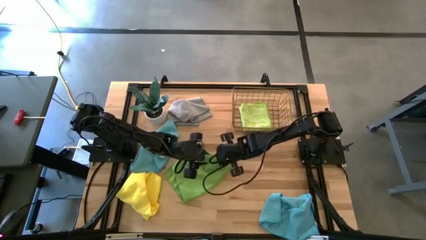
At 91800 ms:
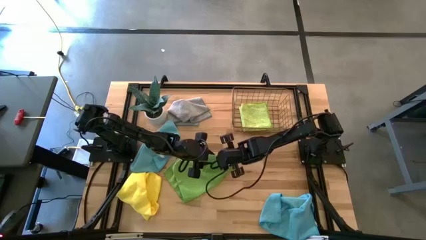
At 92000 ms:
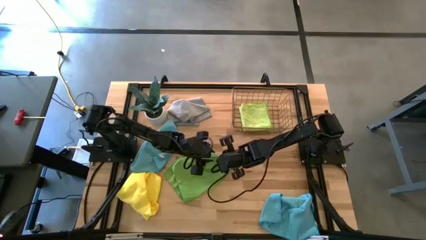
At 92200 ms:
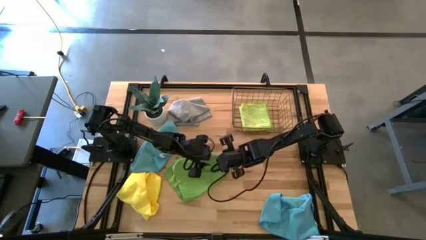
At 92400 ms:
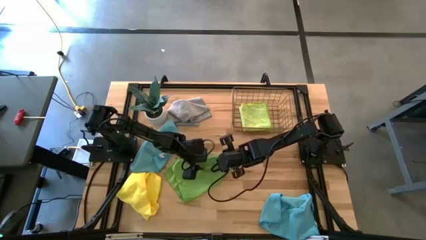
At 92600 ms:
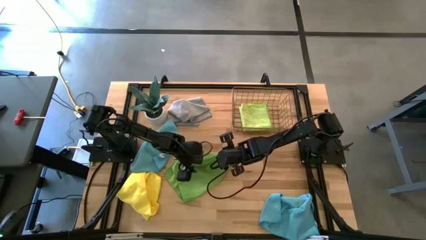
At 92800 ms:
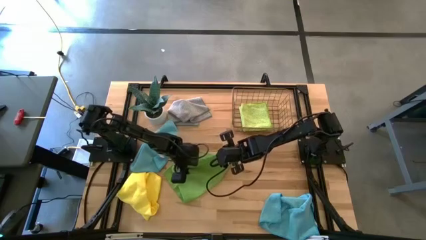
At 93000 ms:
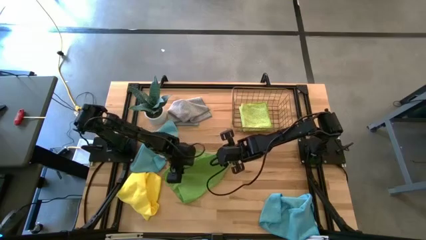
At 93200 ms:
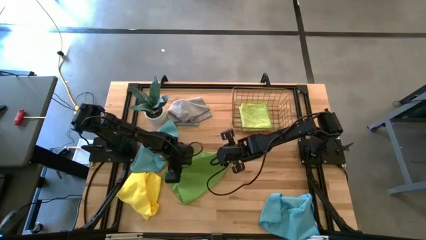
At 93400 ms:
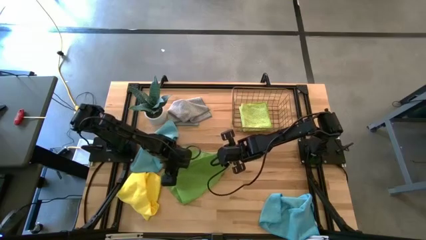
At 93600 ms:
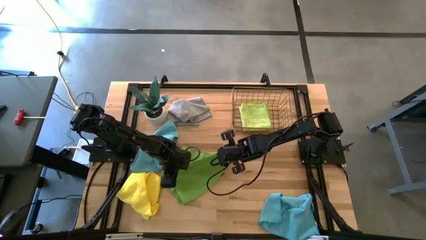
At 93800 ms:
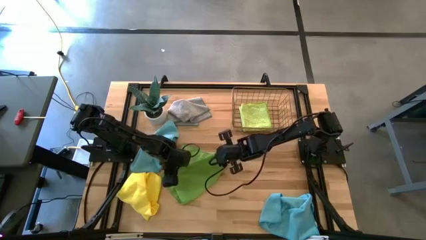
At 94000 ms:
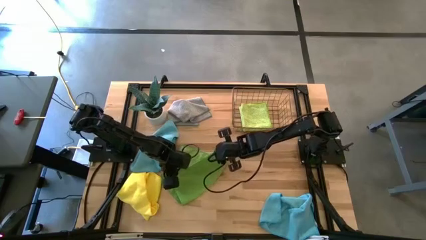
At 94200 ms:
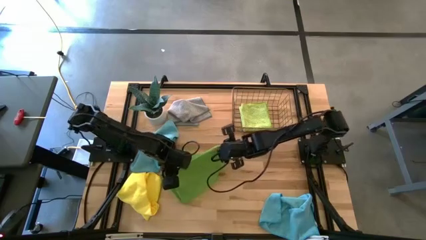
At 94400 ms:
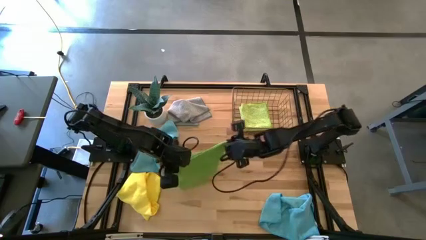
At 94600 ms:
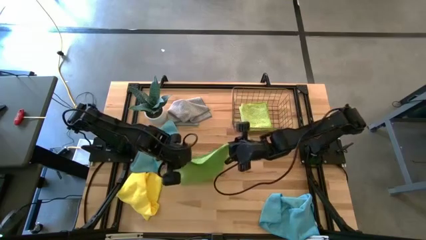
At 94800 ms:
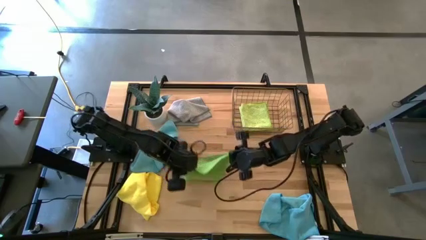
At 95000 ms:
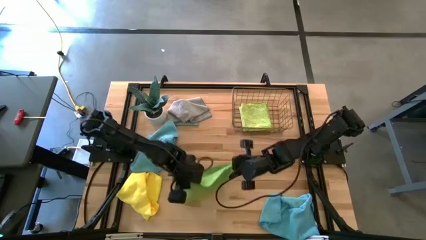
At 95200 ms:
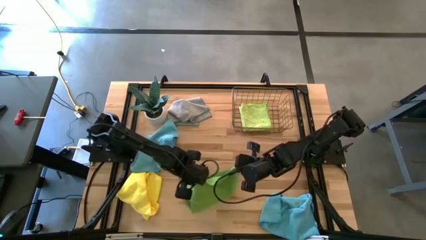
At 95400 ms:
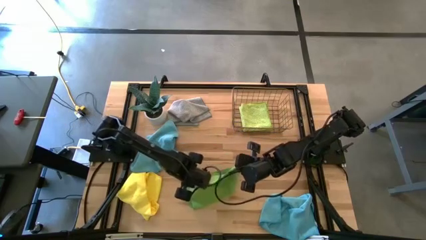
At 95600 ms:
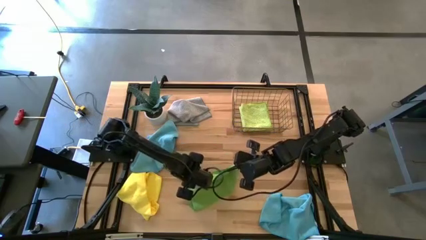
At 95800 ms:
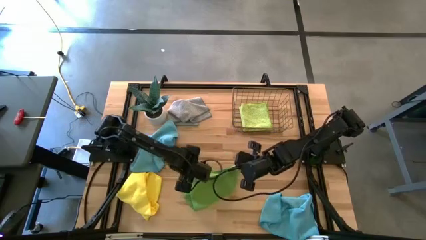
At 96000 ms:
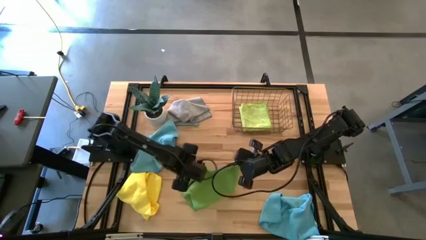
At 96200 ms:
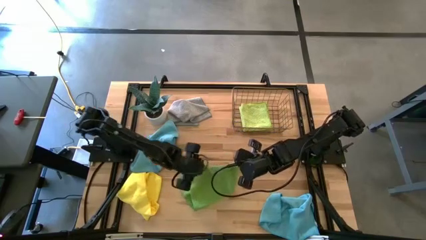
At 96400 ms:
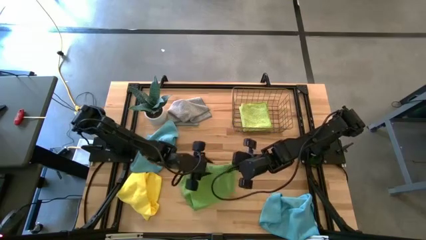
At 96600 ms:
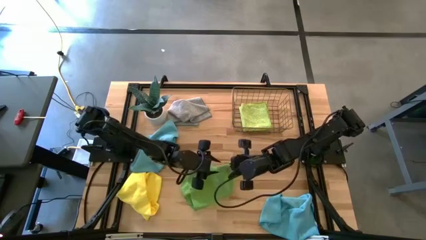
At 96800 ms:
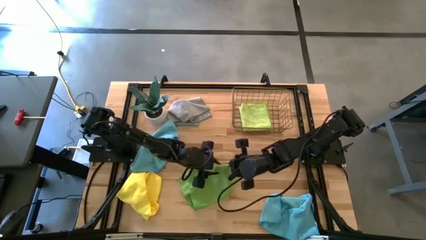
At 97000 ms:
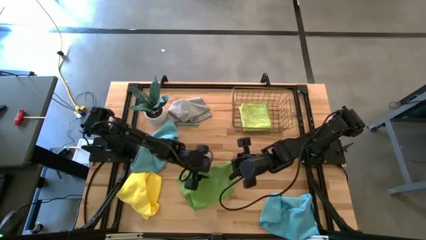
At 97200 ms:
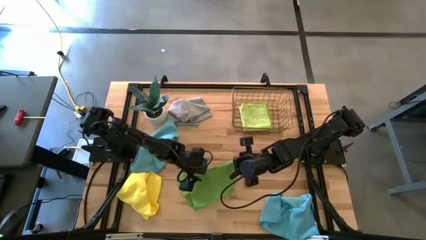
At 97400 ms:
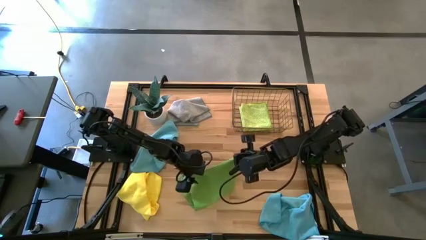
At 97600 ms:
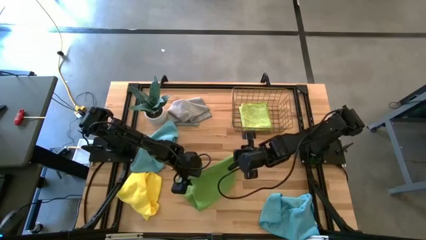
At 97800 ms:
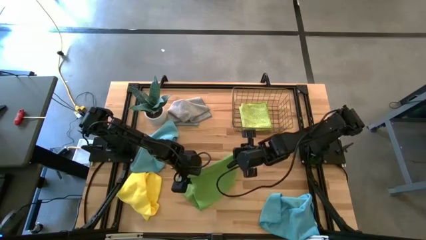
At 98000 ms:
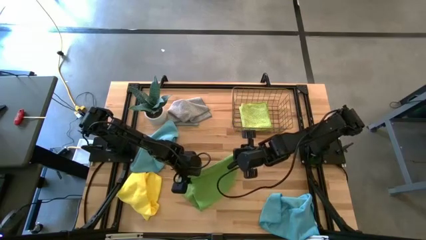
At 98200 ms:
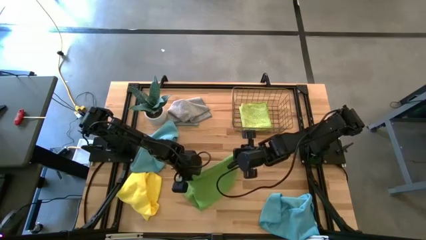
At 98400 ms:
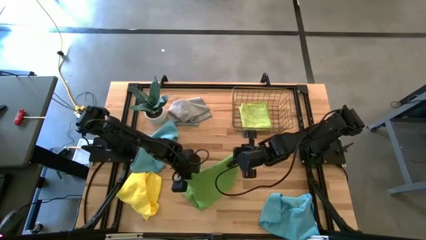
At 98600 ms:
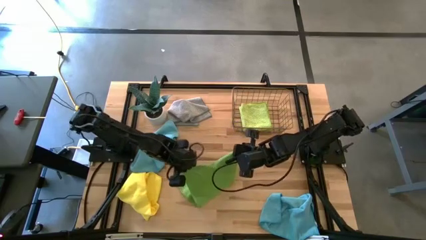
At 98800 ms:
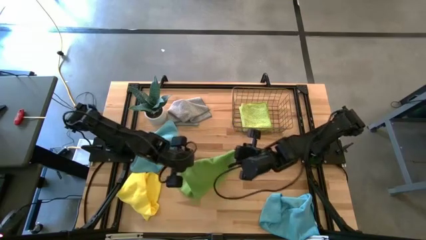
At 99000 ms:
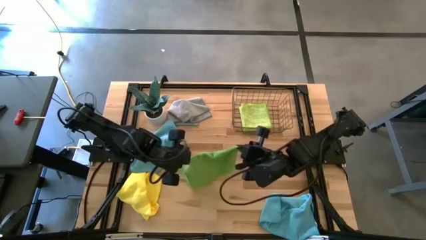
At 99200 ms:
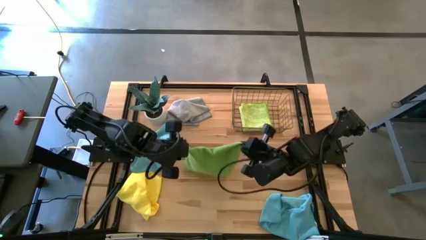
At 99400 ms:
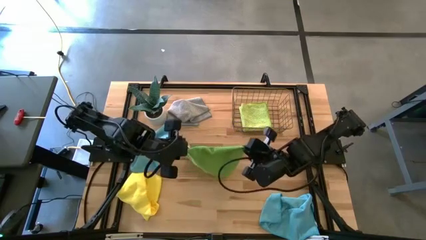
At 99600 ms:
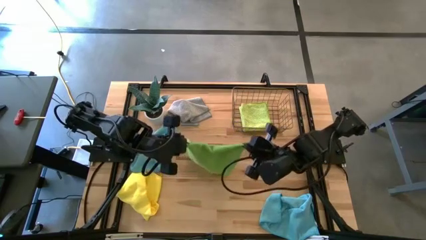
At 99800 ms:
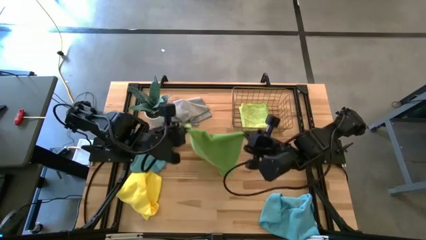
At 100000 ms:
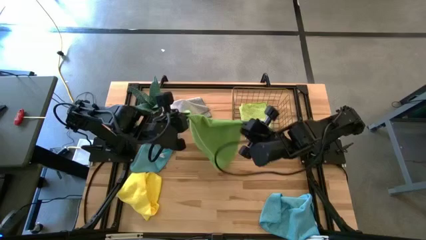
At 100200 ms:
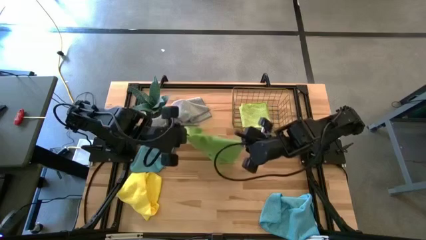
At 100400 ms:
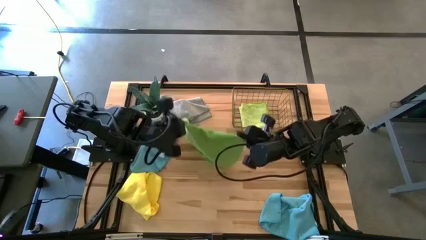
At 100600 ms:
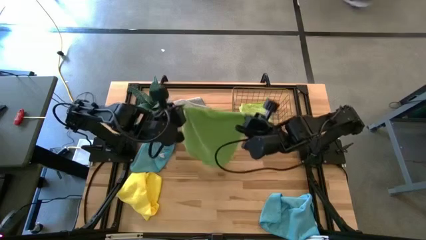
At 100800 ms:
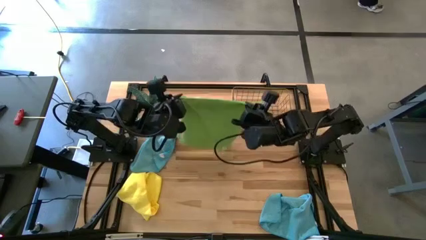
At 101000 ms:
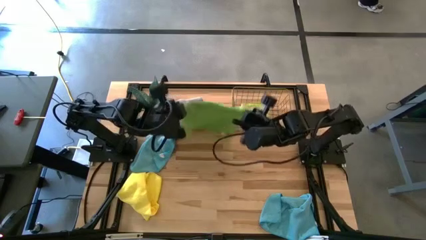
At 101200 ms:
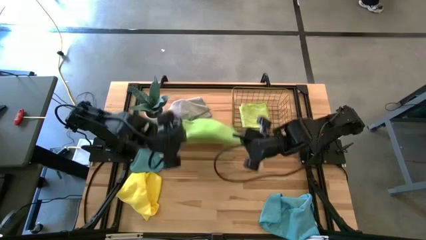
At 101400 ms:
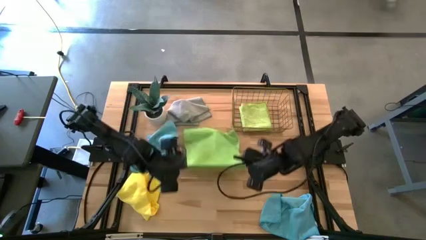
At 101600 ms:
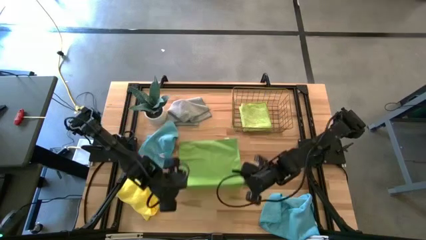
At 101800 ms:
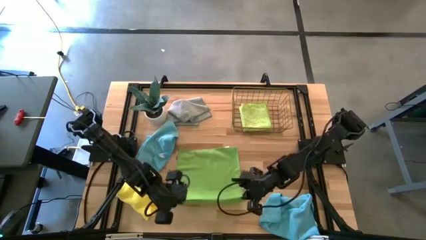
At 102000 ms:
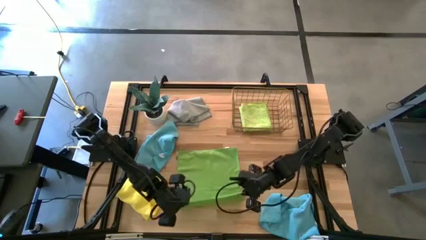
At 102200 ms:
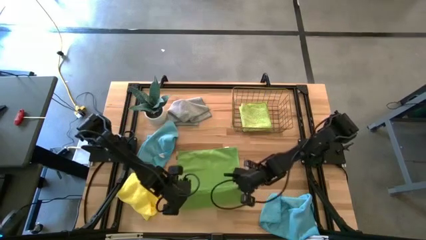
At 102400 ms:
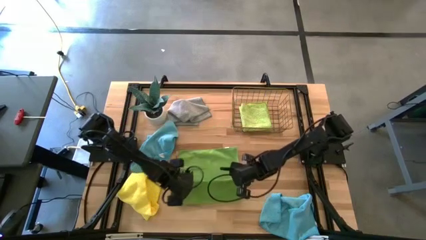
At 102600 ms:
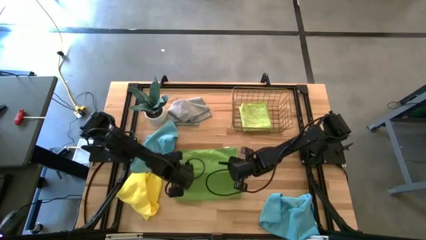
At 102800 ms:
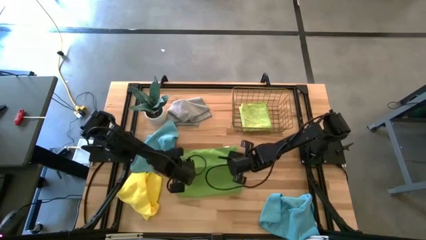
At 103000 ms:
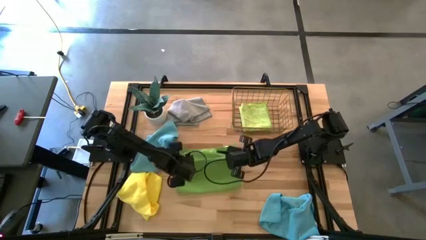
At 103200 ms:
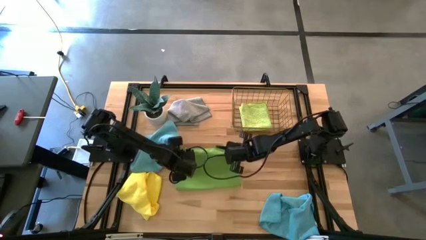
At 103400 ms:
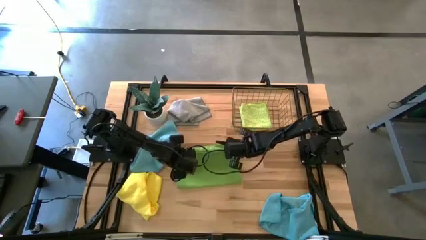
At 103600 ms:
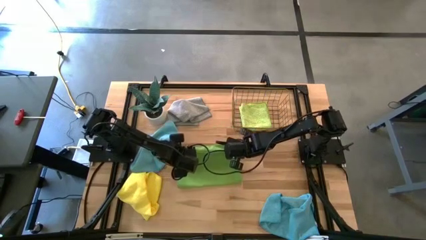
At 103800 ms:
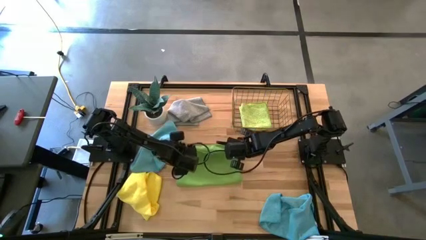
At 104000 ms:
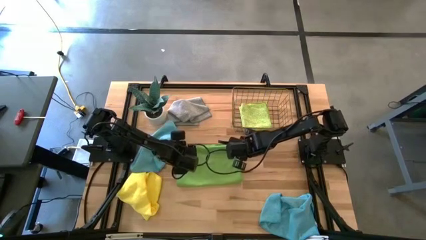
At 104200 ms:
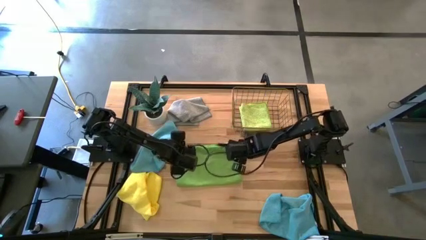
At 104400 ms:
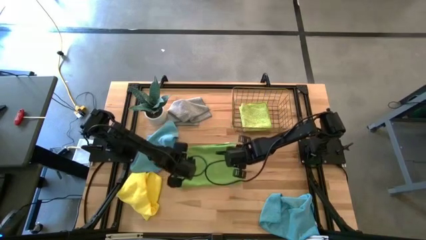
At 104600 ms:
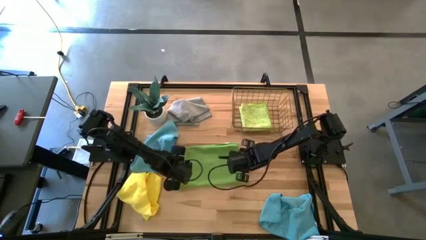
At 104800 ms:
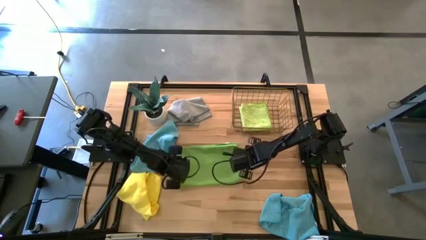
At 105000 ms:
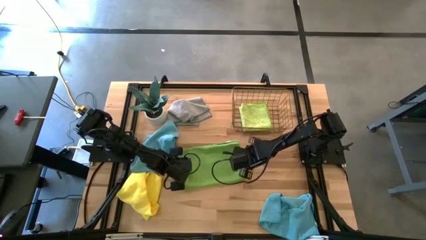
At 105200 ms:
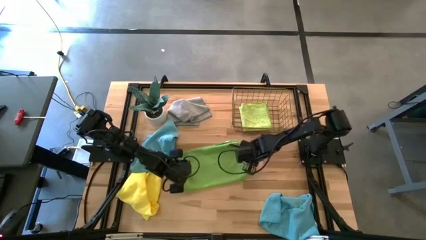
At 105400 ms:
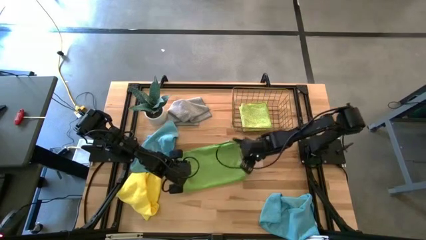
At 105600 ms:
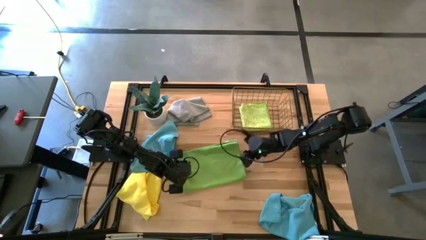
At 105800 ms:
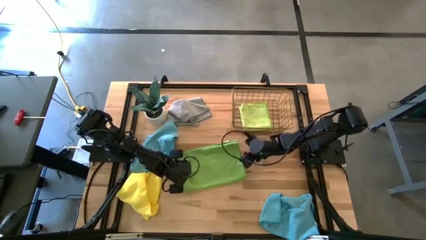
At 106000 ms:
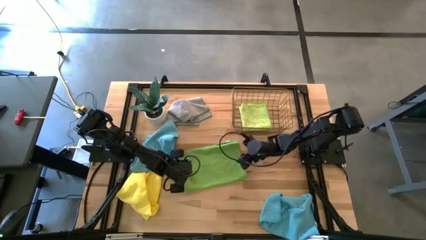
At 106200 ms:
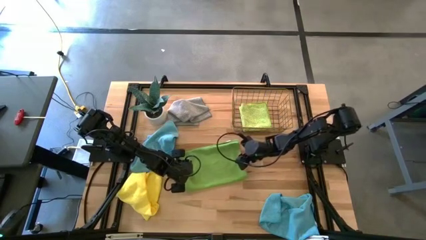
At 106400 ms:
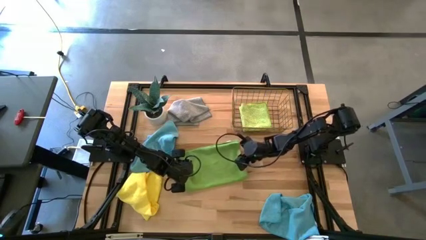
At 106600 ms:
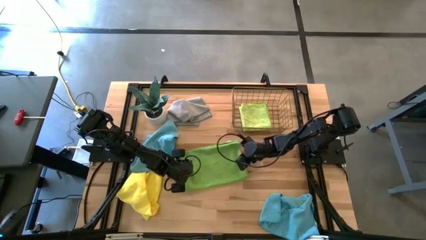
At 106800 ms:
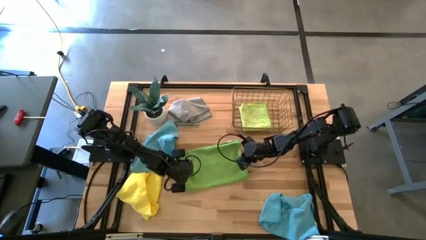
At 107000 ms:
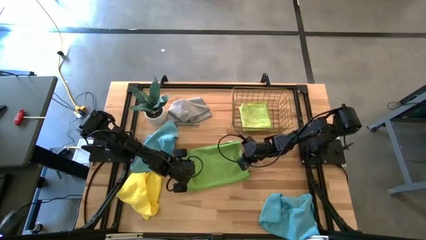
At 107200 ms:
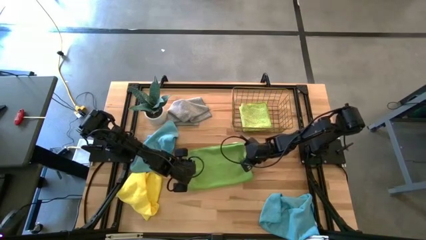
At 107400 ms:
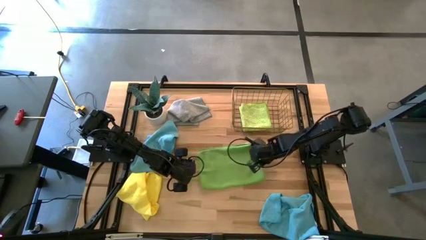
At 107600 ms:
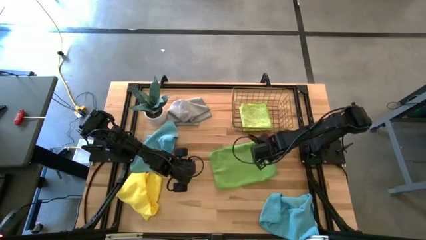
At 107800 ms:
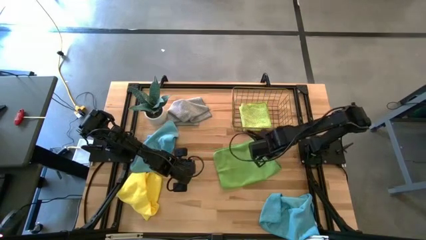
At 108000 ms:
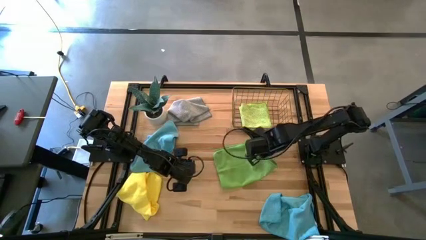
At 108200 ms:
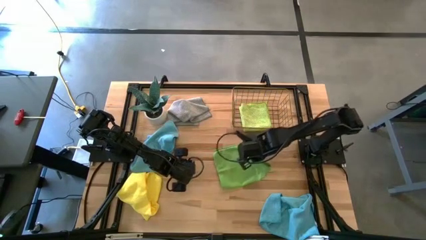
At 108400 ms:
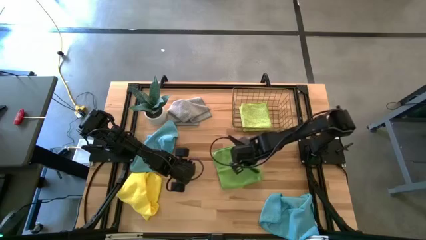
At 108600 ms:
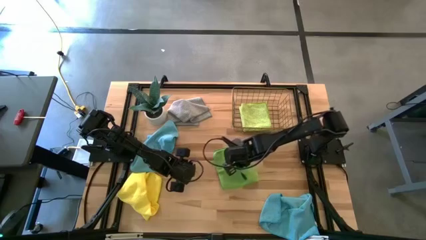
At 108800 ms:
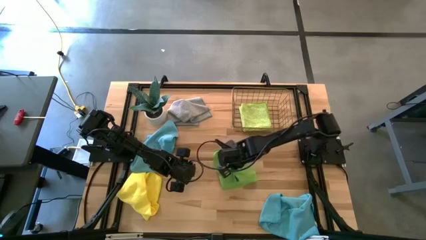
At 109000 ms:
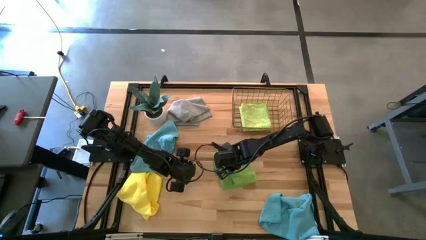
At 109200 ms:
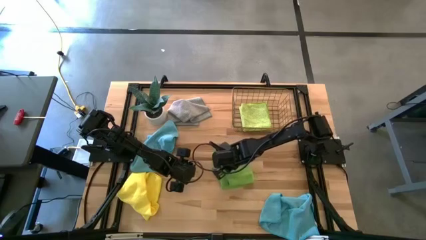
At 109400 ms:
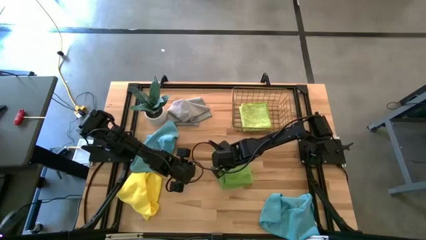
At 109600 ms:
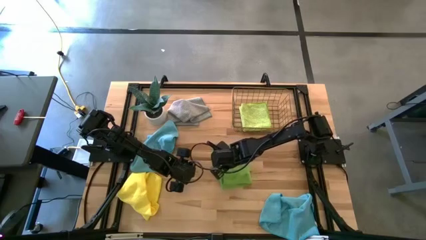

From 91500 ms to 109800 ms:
Task: Fold microfiber towels
Fold the green microfiber towel
